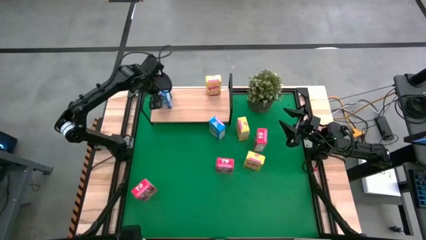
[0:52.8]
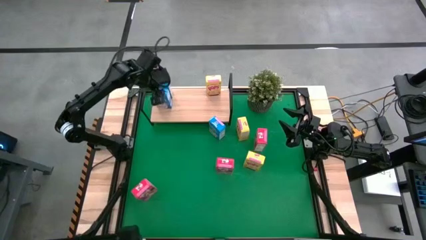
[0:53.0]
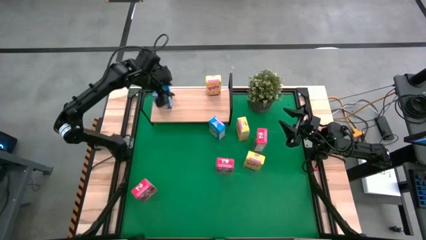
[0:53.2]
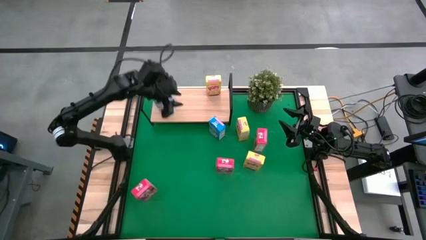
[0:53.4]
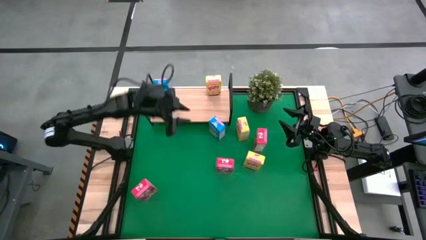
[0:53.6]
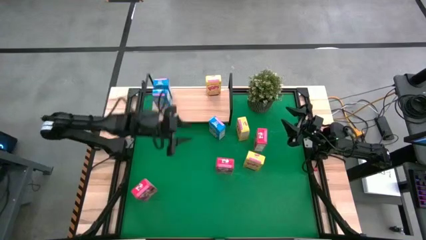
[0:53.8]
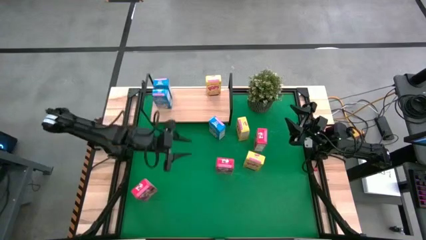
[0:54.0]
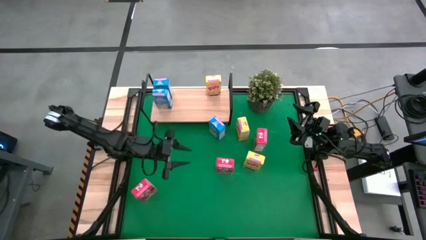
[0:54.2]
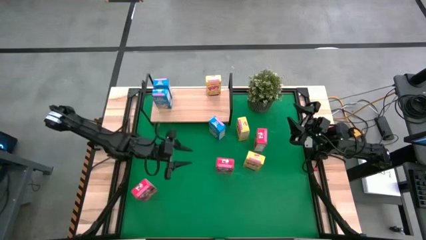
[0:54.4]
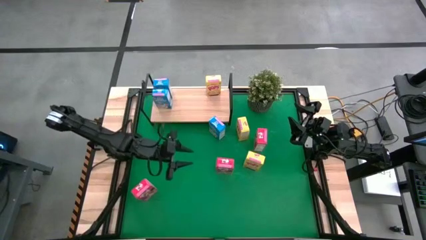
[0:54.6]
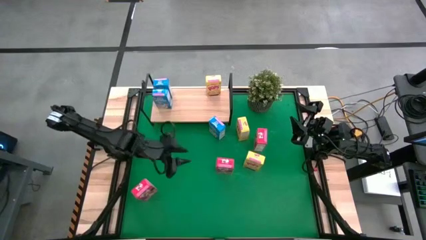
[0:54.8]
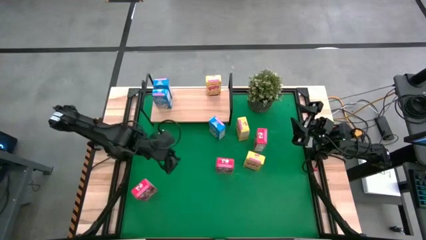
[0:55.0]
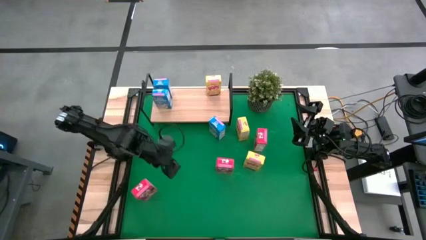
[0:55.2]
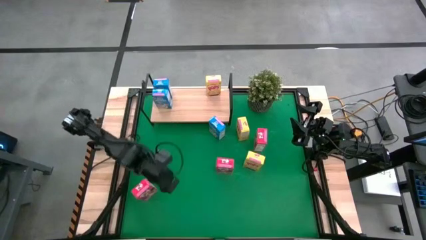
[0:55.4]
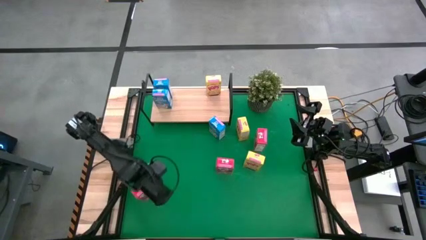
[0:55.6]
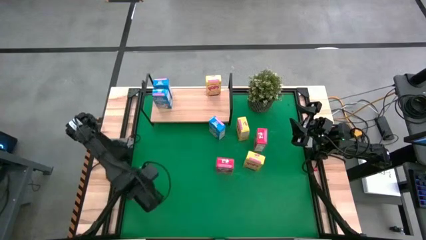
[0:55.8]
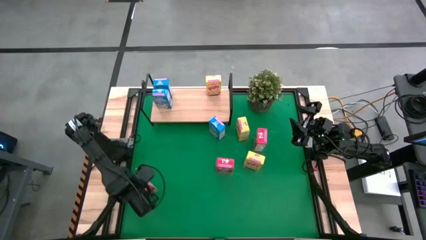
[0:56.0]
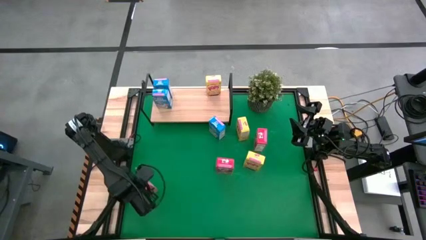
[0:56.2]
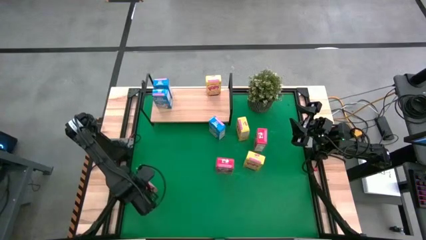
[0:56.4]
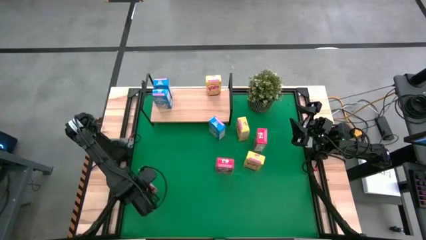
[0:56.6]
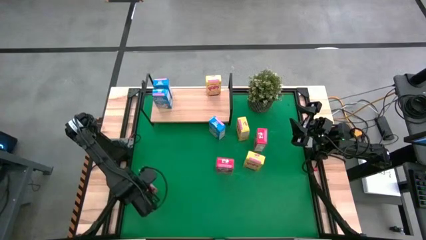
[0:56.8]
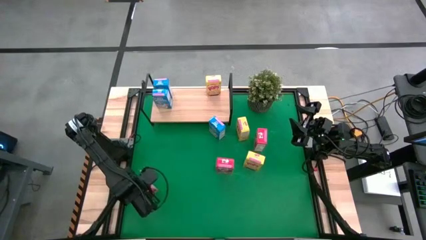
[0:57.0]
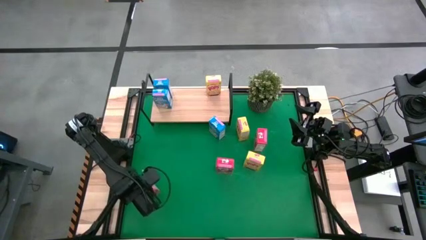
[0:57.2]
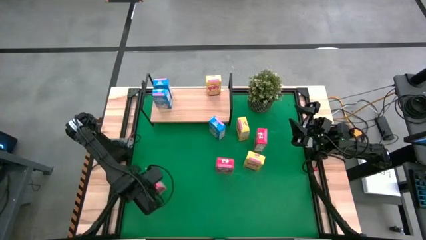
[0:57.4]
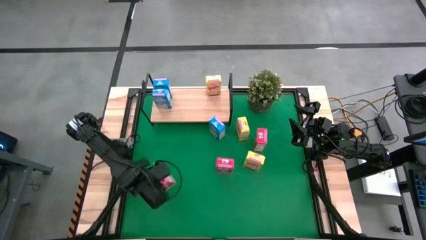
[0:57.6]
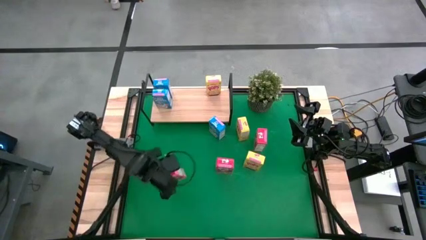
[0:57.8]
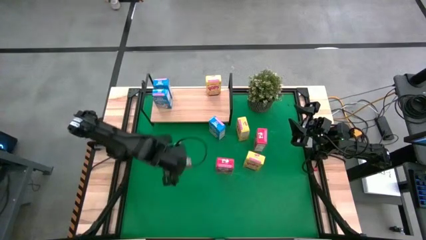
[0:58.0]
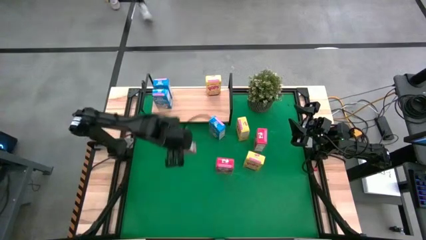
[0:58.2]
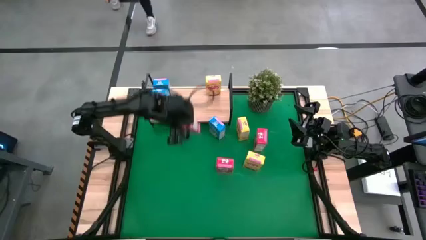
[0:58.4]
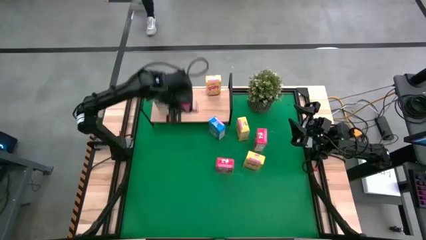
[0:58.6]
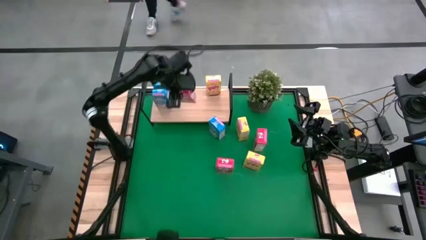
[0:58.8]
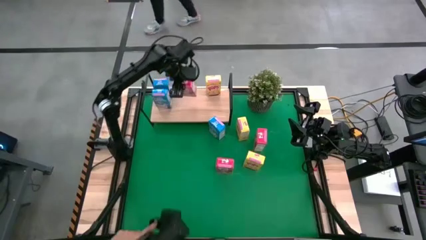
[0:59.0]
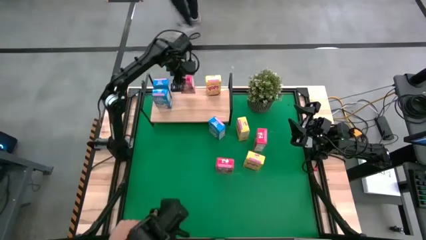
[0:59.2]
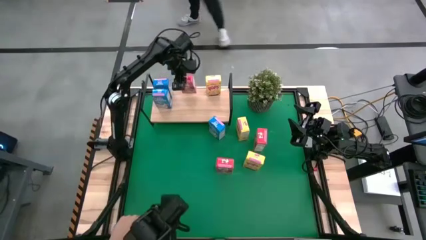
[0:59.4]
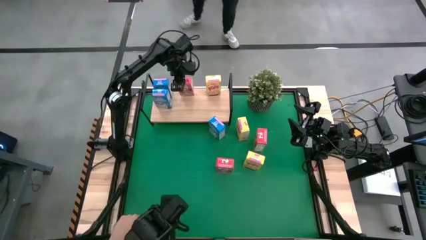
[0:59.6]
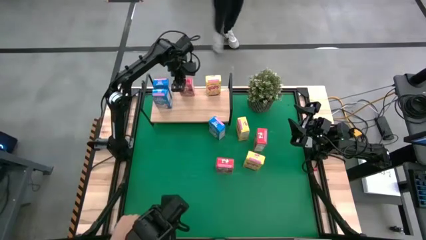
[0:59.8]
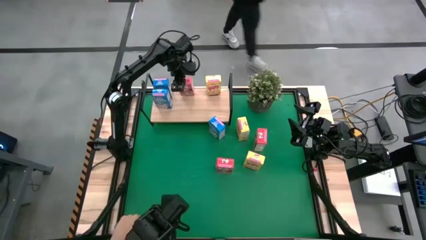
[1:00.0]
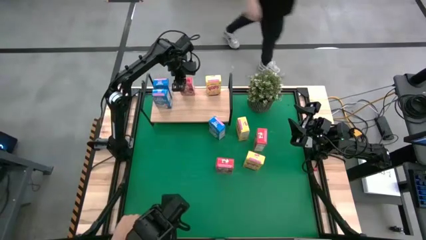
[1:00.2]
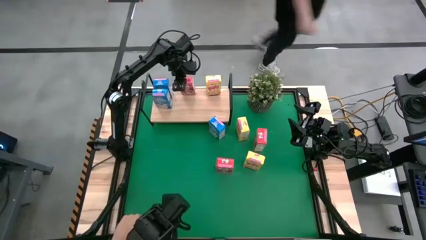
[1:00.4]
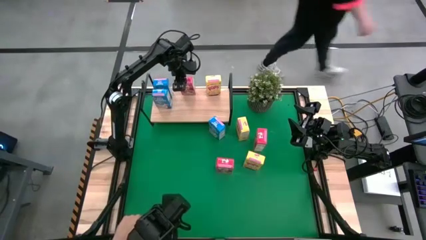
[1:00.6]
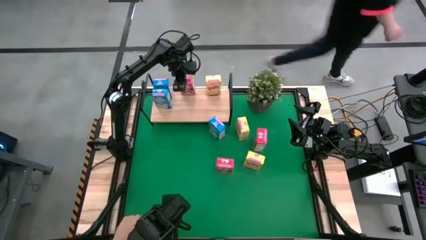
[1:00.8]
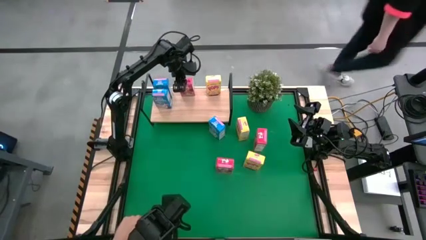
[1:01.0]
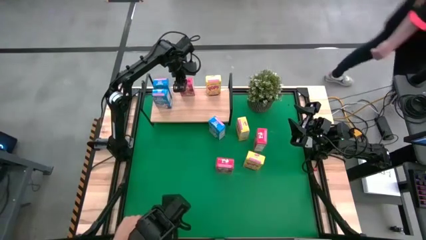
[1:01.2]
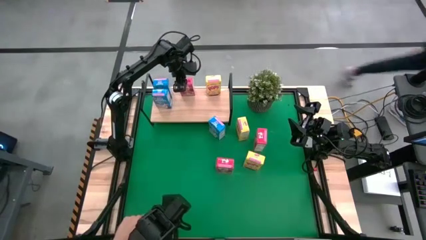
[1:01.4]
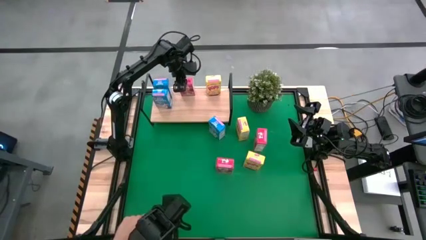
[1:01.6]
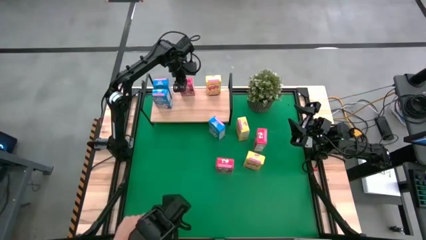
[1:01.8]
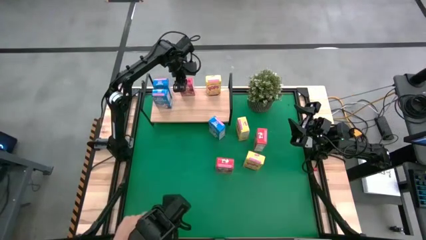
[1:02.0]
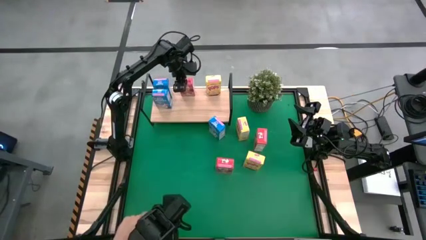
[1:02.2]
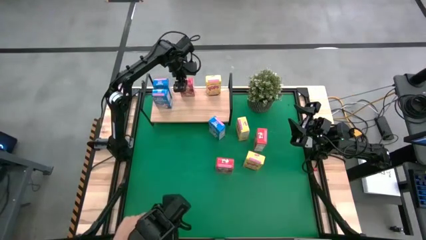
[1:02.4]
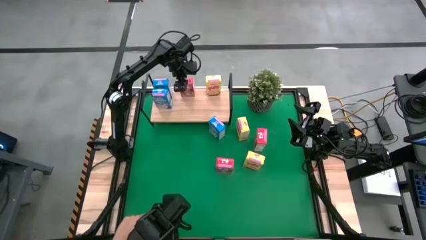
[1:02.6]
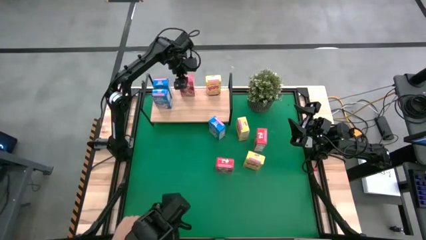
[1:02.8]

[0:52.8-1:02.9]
Task: Stack cereal on shelf
Put the bottom red cereal box on the shelf

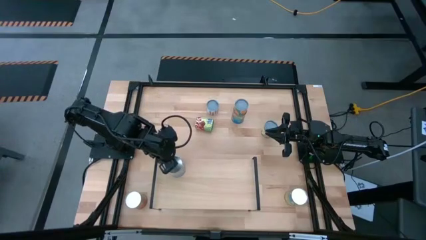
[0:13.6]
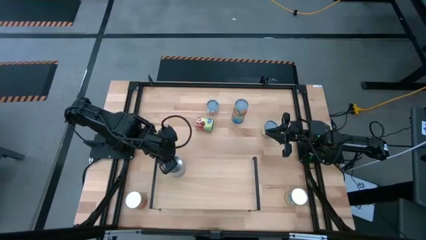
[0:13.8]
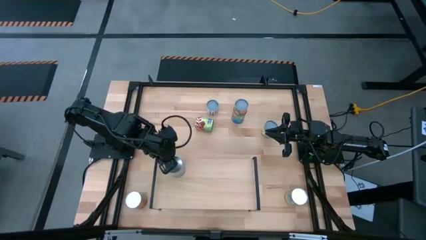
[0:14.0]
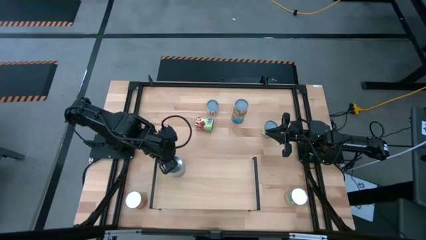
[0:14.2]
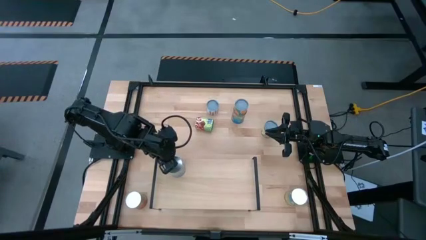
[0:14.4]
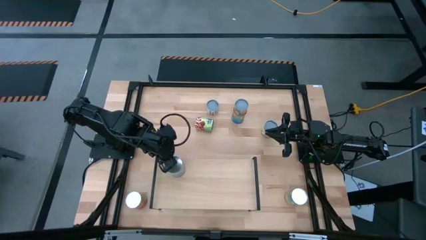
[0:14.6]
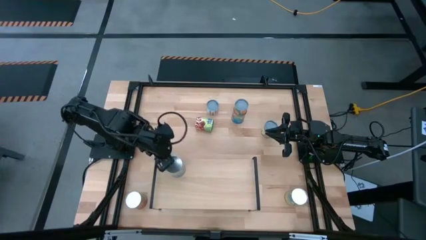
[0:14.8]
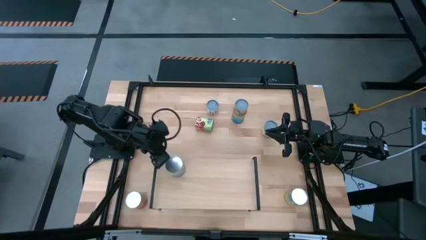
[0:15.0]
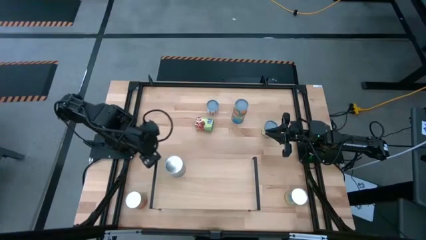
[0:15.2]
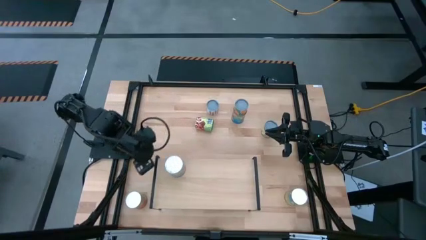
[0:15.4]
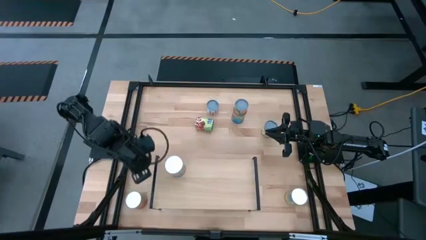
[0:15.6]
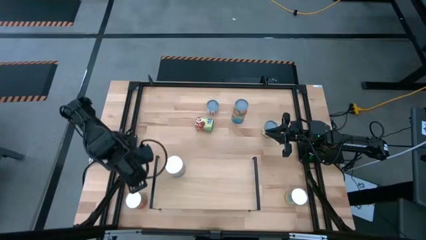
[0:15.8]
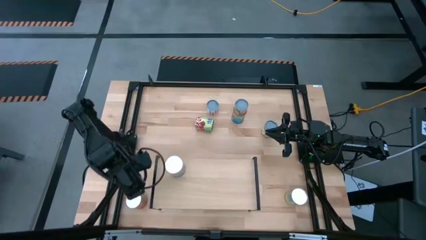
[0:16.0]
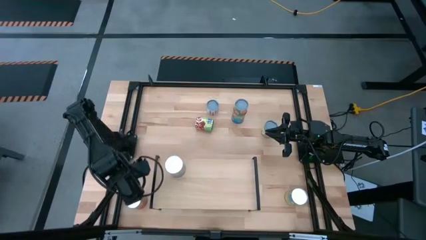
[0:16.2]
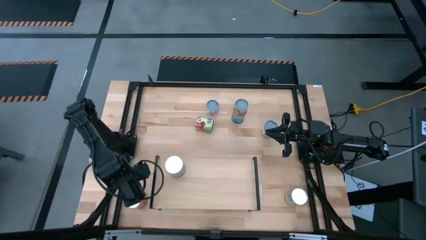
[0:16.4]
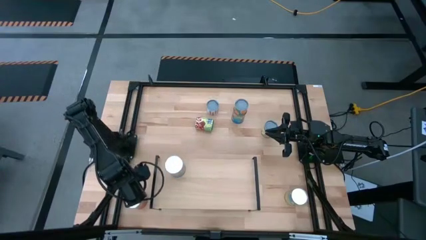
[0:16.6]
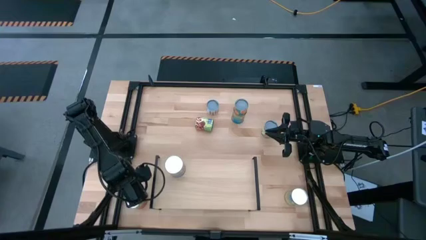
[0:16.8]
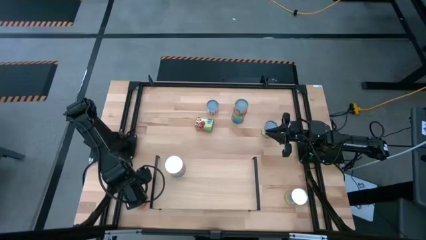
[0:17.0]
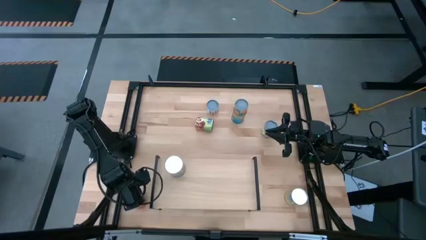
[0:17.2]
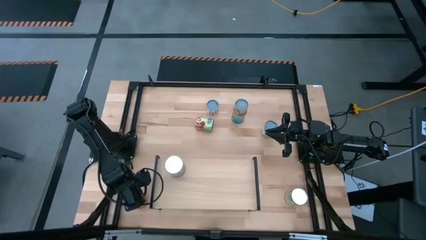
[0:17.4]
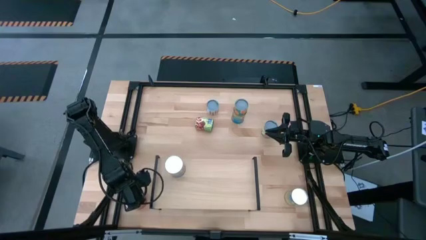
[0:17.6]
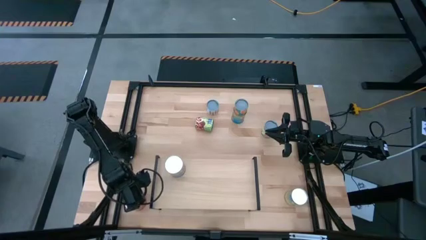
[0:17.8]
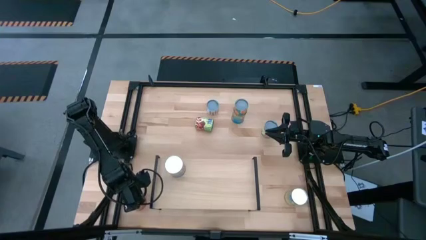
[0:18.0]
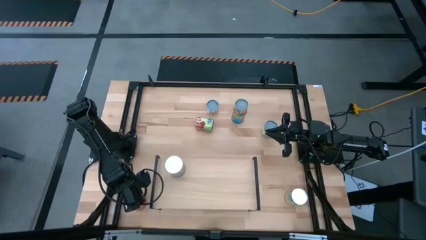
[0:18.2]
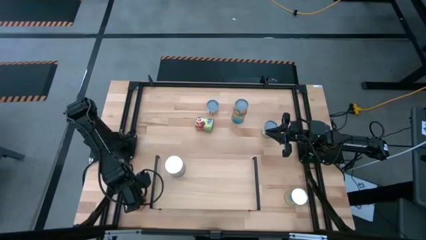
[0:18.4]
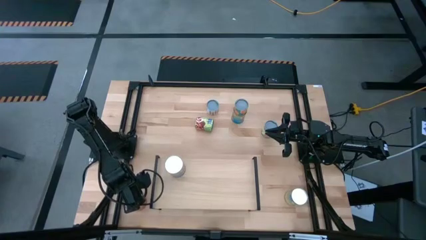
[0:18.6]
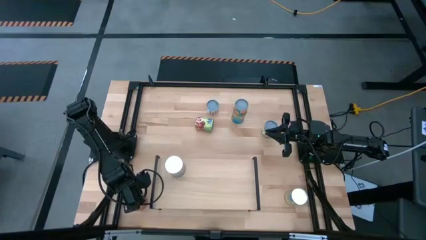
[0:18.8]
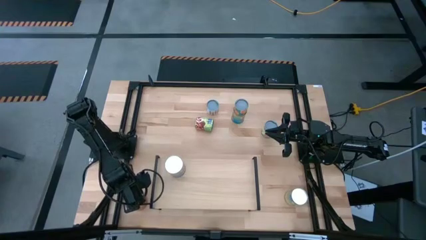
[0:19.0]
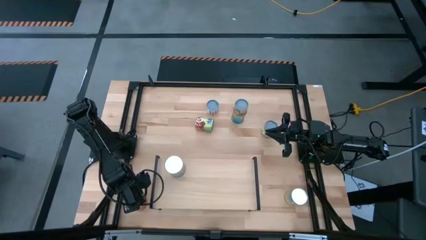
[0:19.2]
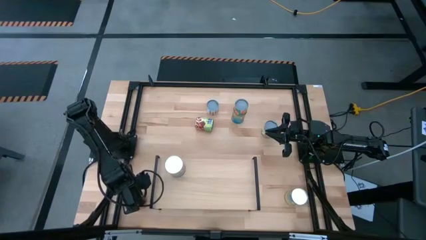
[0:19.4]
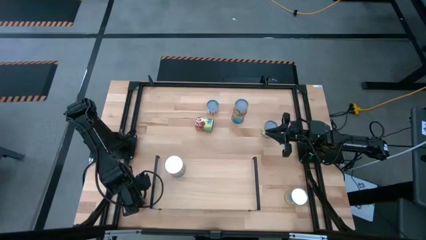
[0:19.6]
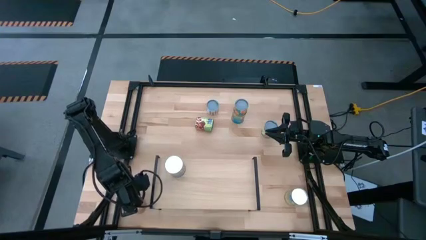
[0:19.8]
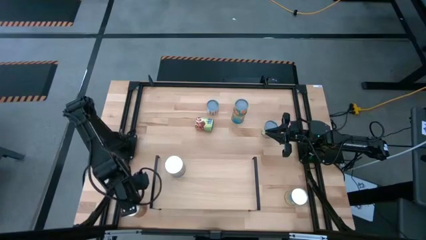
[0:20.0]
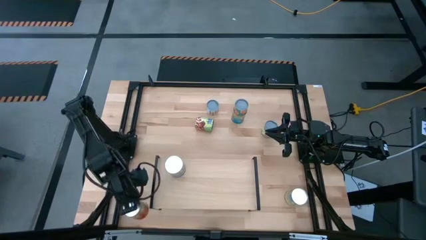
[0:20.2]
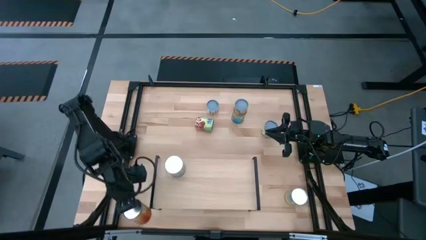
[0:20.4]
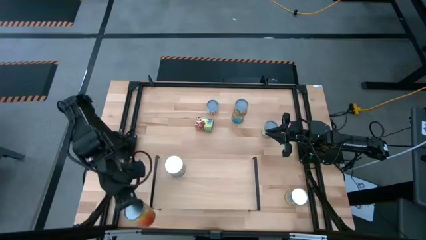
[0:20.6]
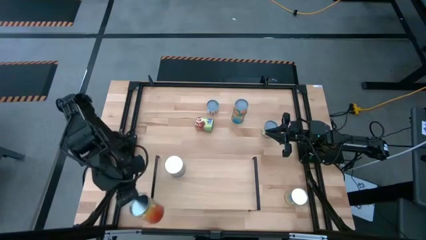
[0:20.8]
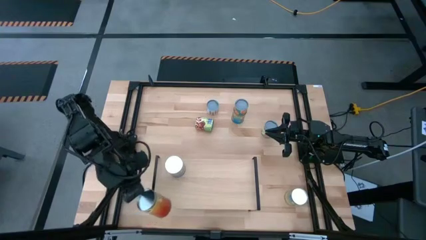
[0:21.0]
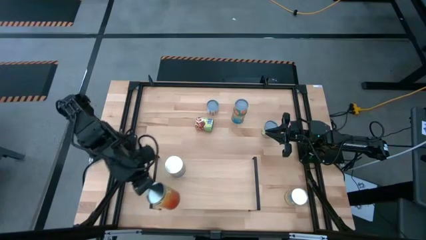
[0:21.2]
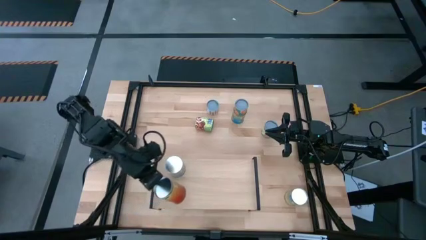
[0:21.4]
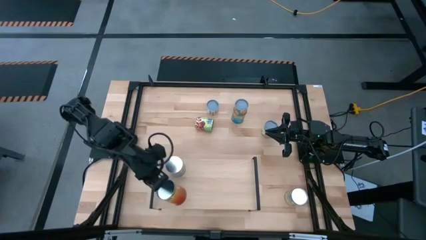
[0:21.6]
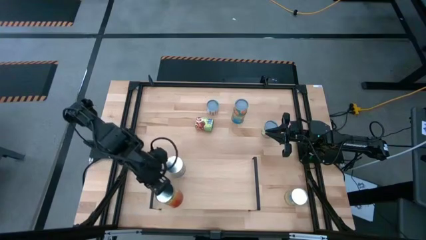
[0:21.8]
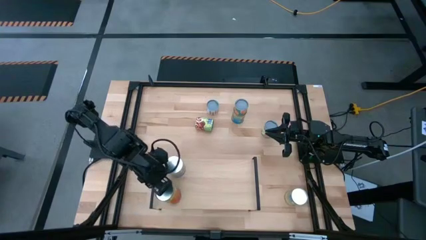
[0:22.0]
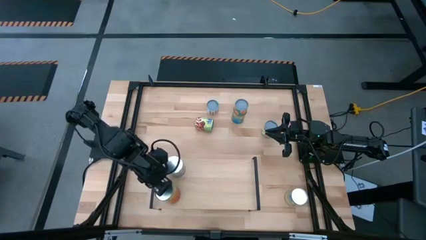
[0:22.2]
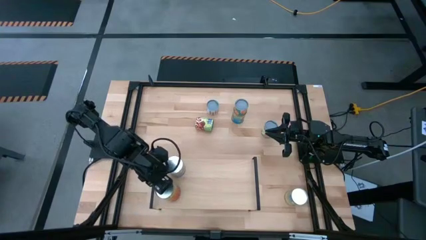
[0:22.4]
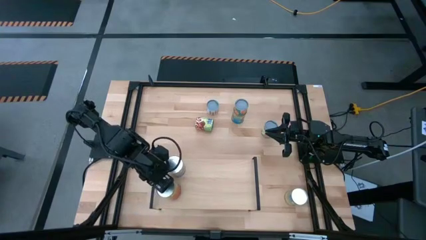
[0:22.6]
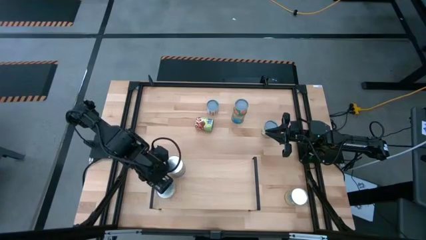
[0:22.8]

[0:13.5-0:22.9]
Task: Pick and place cans onto a shelf
Put the canned pineapple on the shelf
